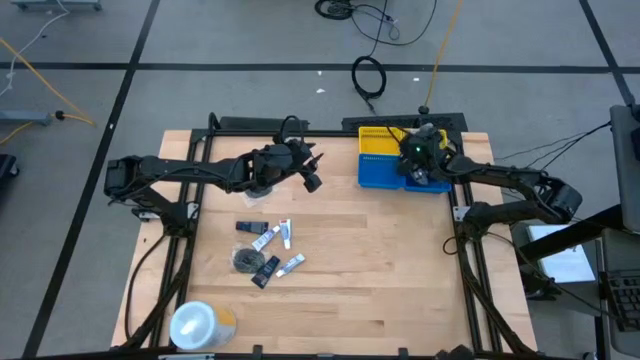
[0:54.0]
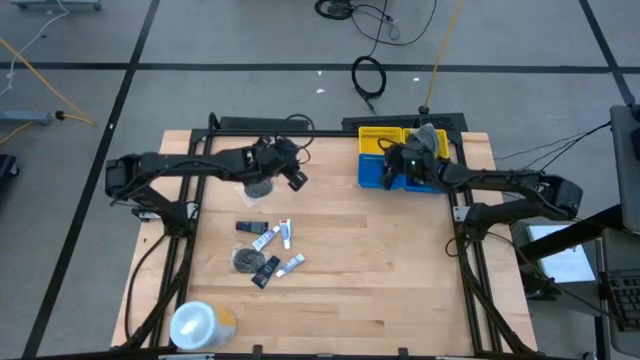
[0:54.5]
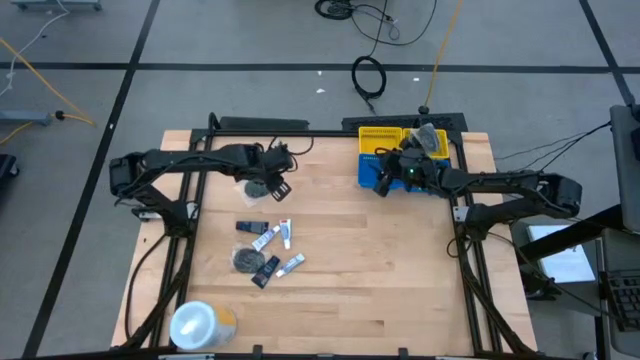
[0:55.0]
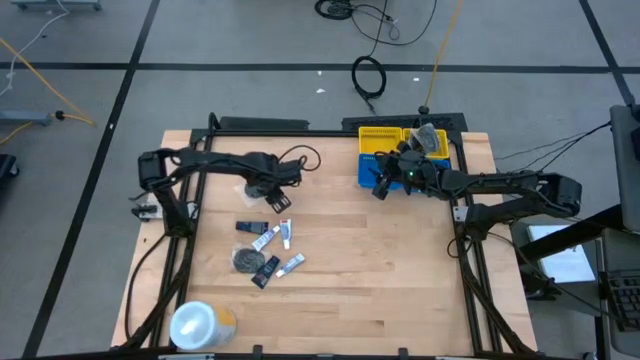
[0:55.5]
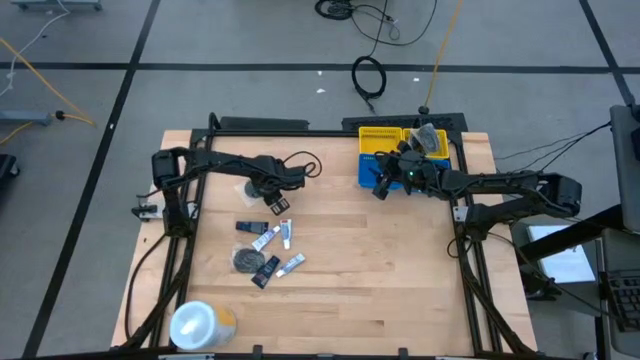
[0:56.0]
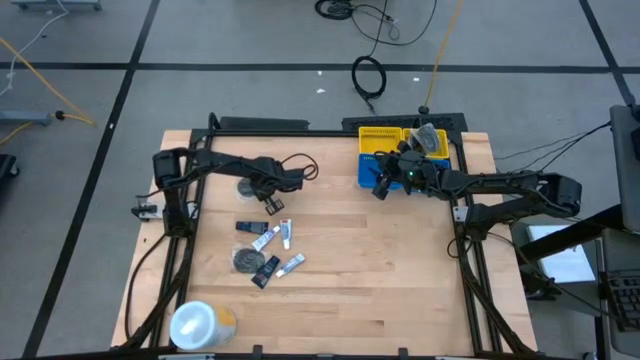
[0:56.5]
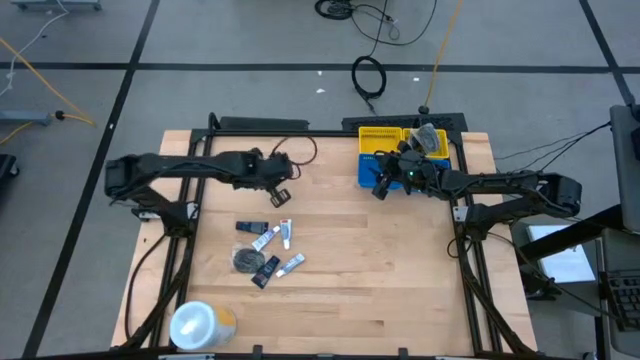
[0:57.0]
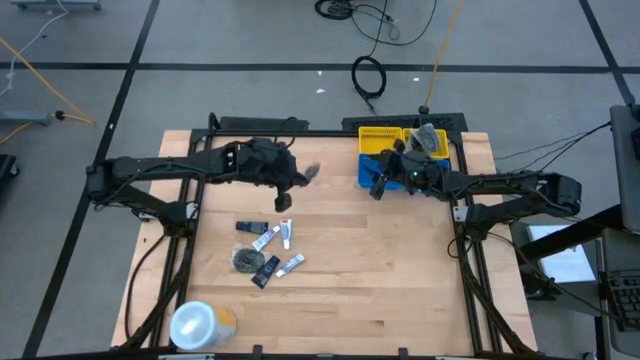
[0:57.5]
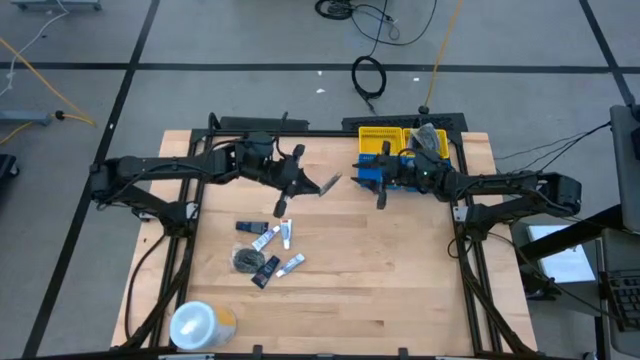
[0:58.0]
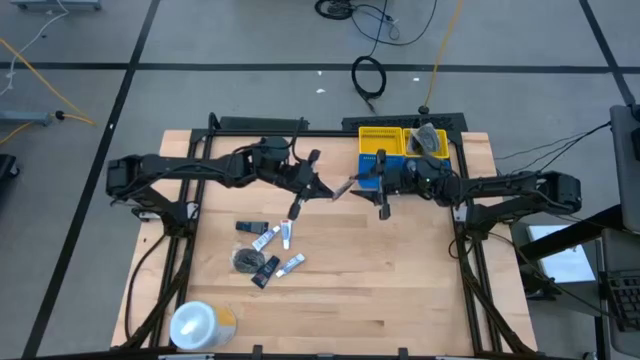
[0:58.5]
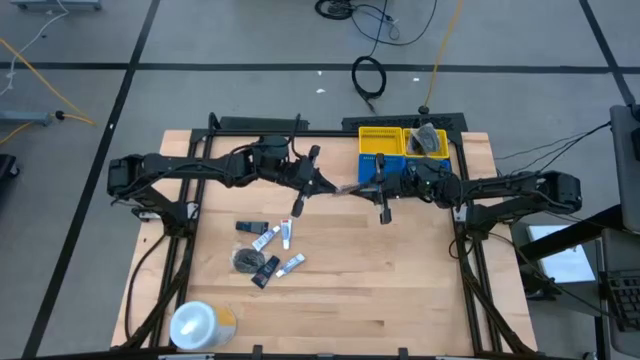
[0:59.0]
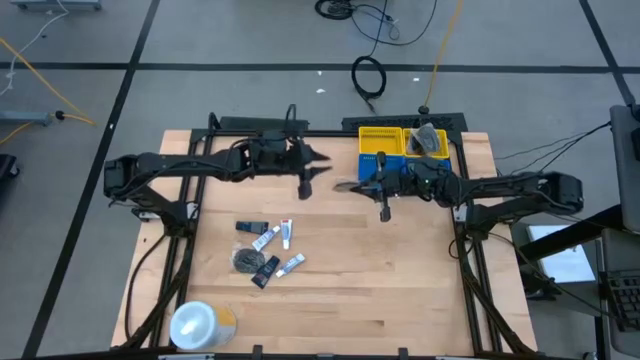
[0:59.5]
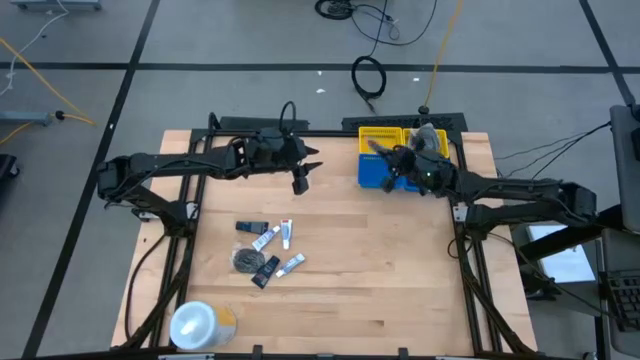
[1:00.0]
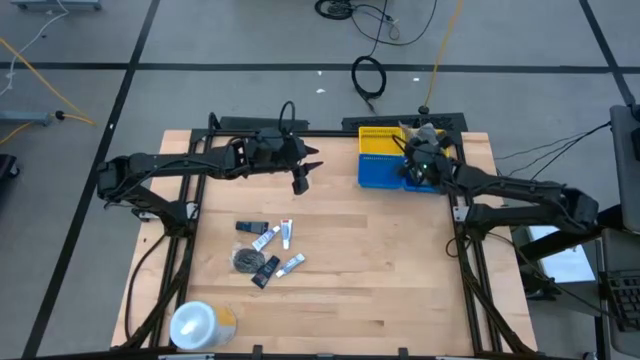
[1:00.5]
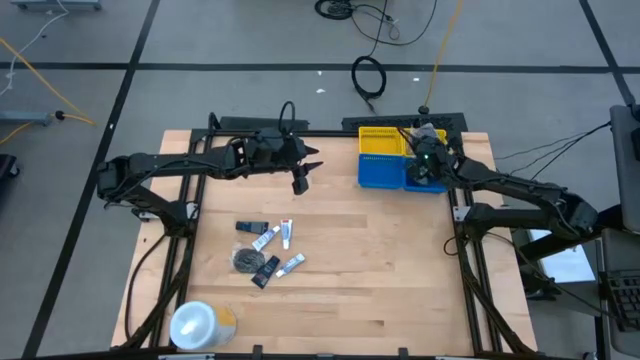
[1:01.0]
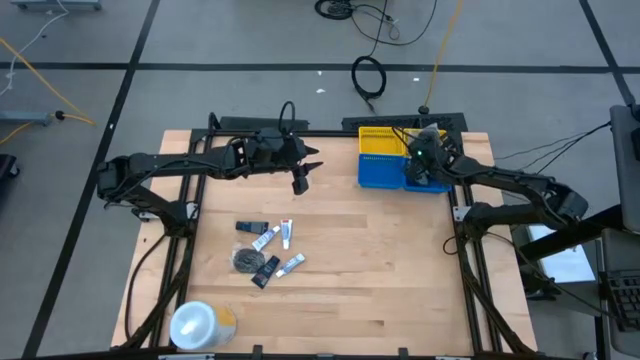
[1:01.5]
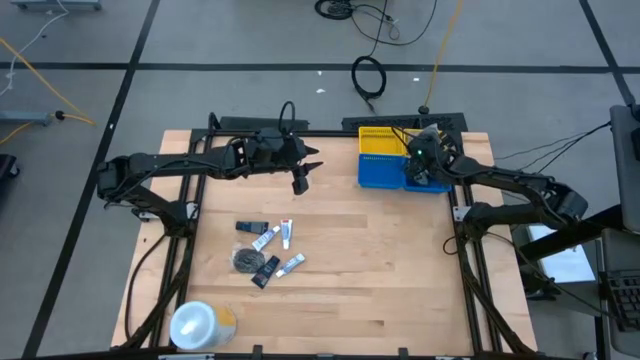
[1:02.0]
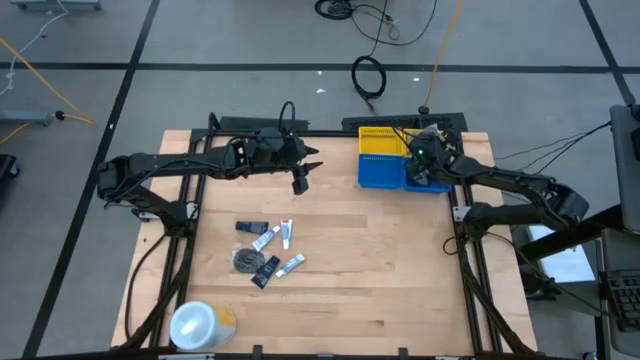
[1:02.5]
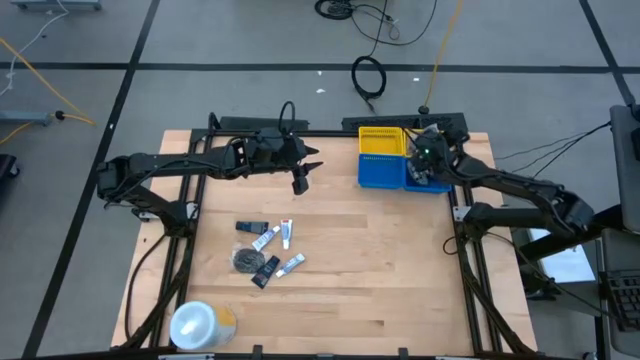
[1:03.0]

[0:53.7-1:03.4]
Task: Pick & Place Travel size toiletries
Put the black hairbrush into the right yellow basket

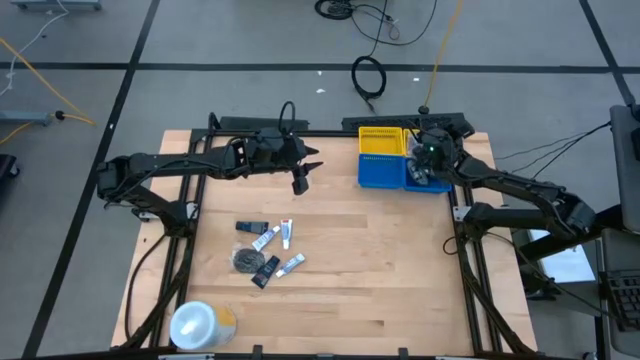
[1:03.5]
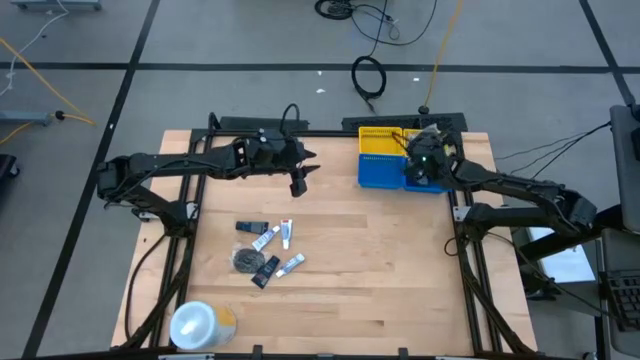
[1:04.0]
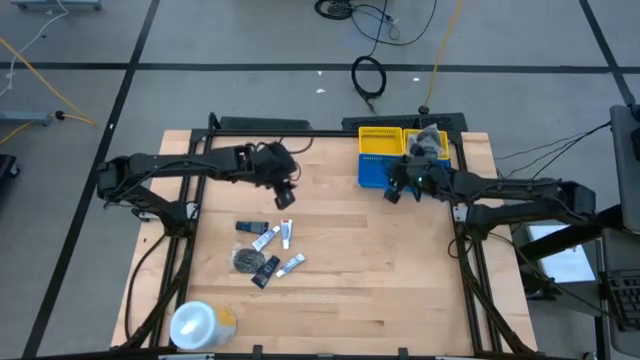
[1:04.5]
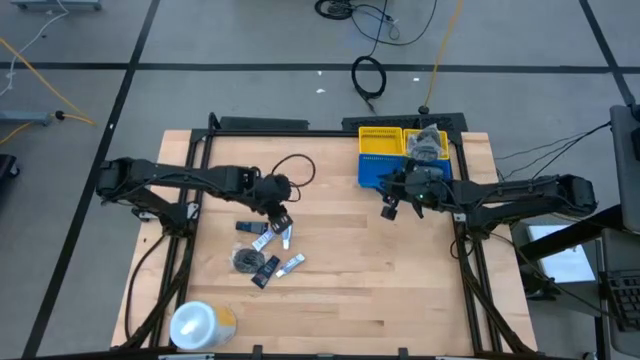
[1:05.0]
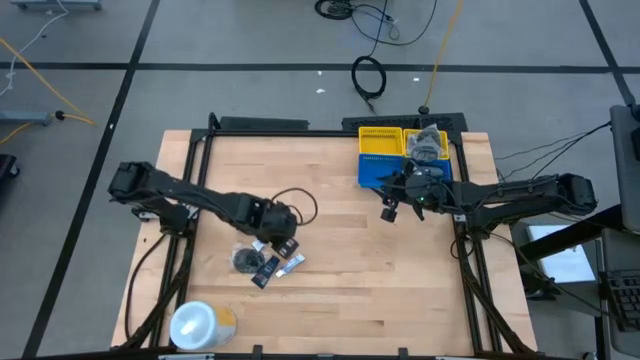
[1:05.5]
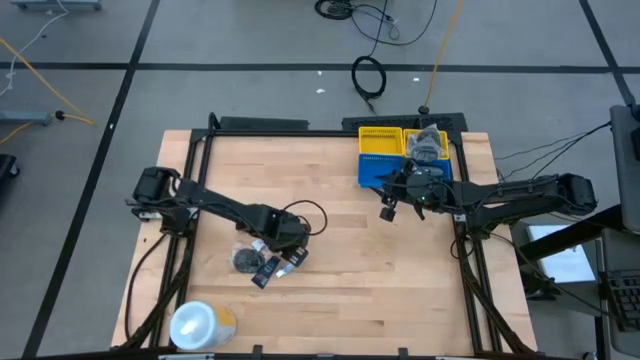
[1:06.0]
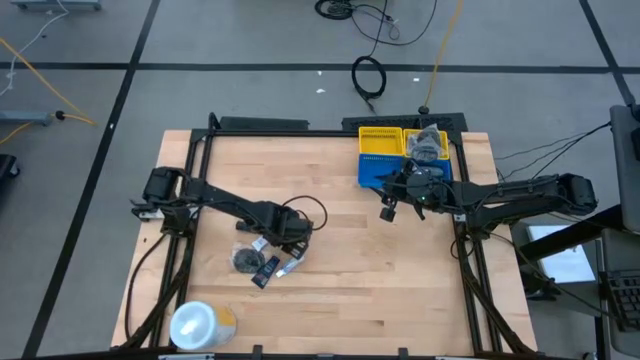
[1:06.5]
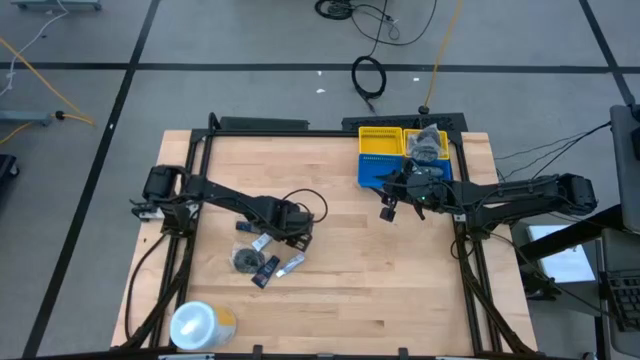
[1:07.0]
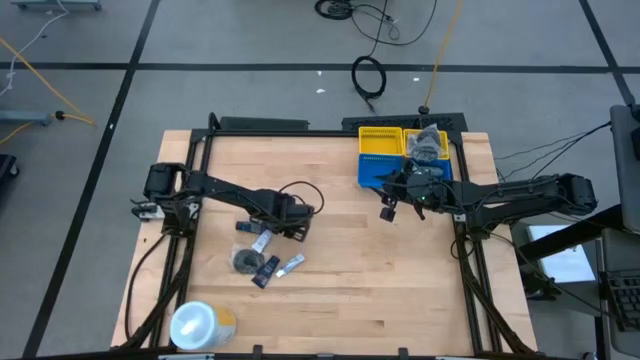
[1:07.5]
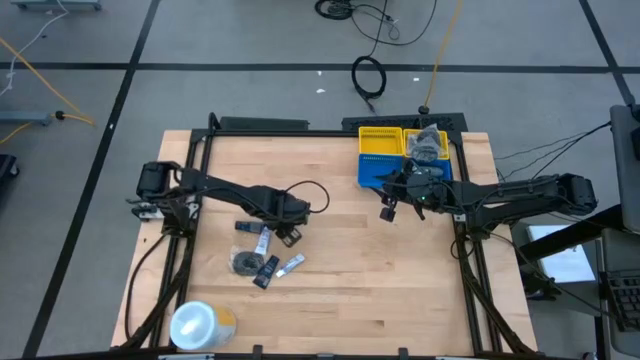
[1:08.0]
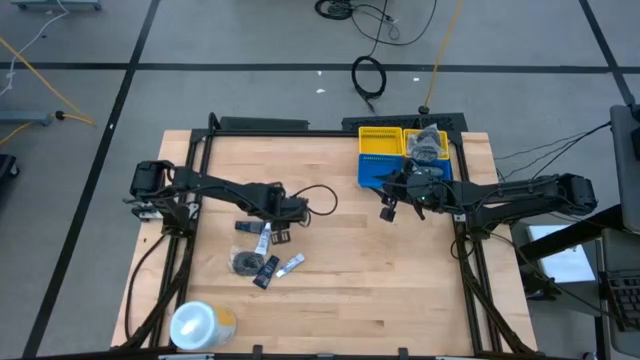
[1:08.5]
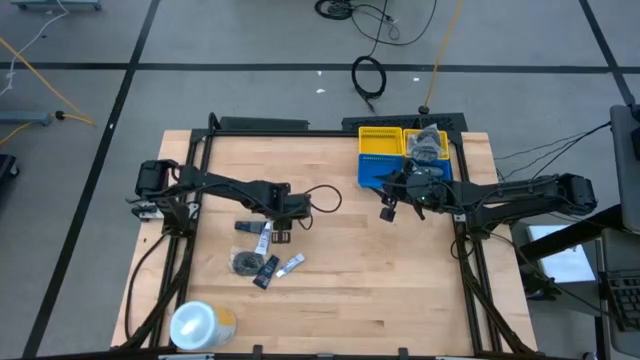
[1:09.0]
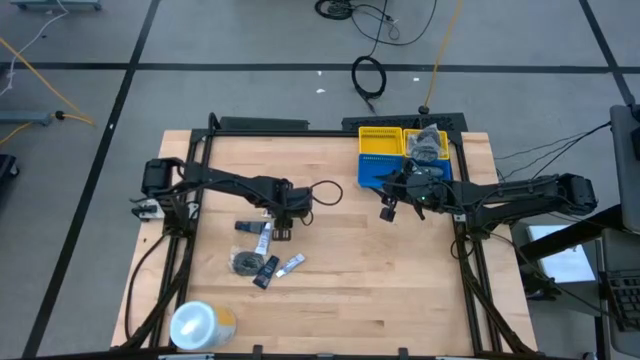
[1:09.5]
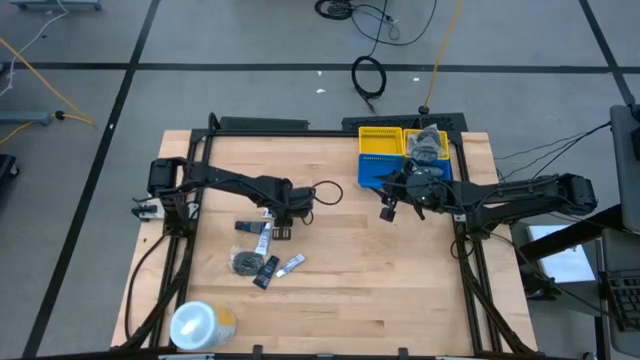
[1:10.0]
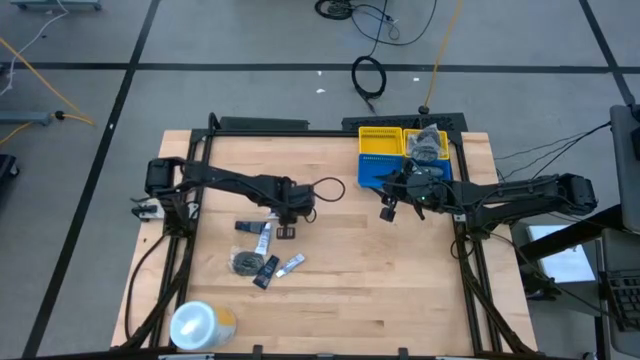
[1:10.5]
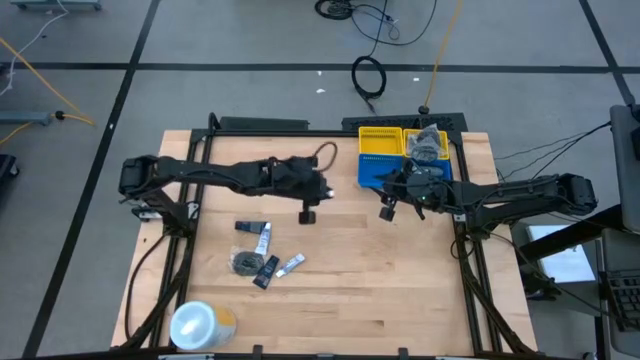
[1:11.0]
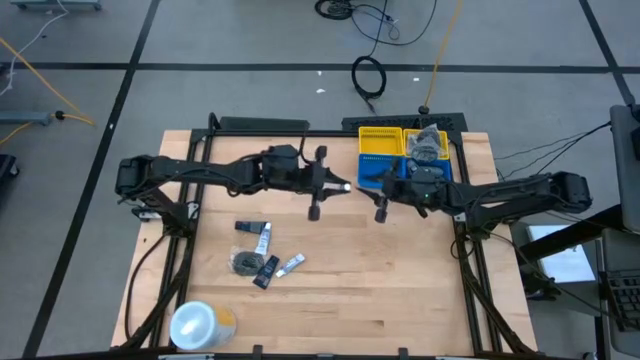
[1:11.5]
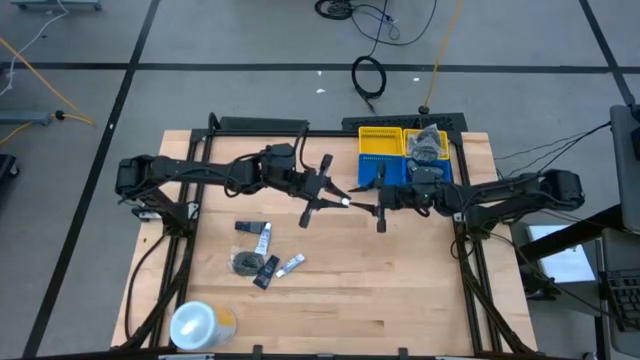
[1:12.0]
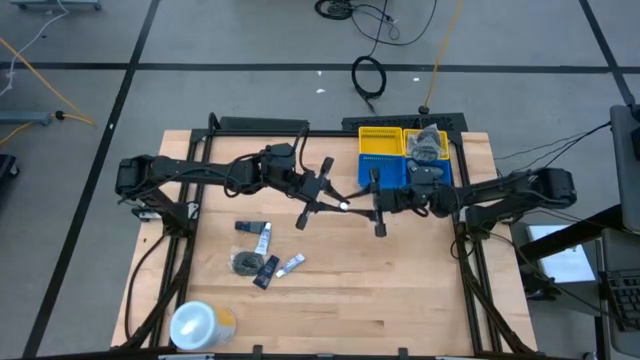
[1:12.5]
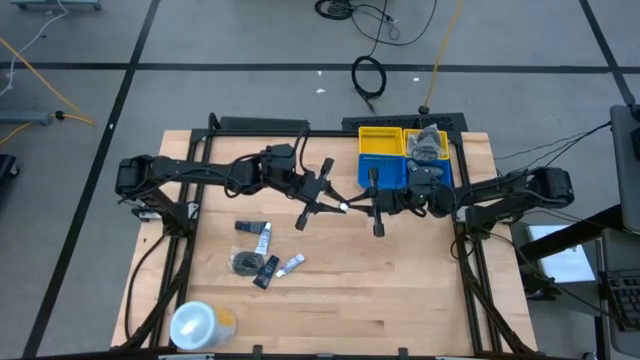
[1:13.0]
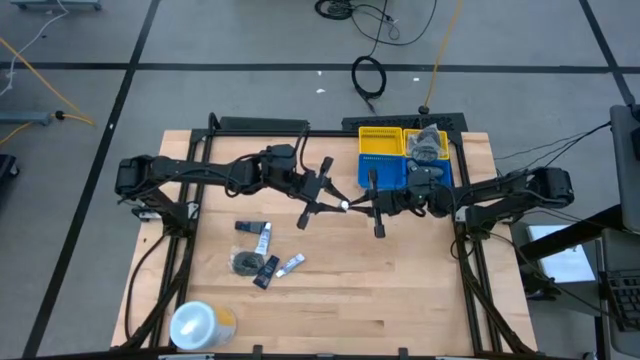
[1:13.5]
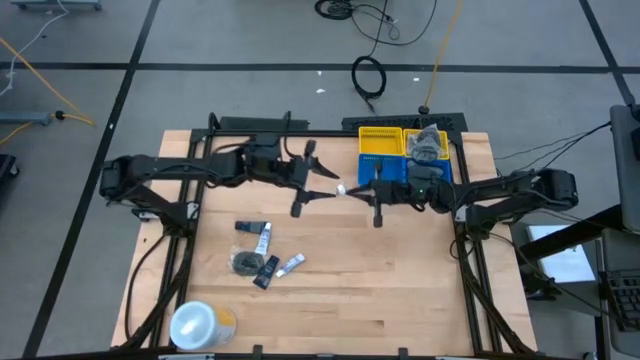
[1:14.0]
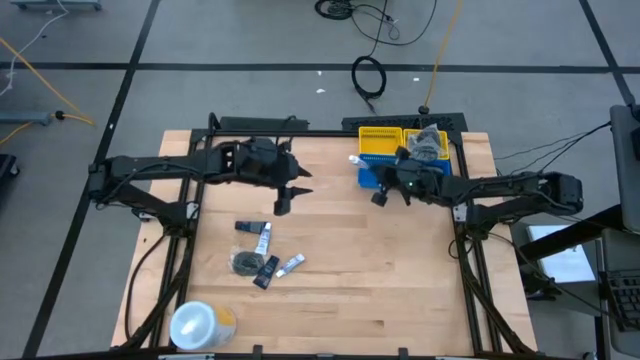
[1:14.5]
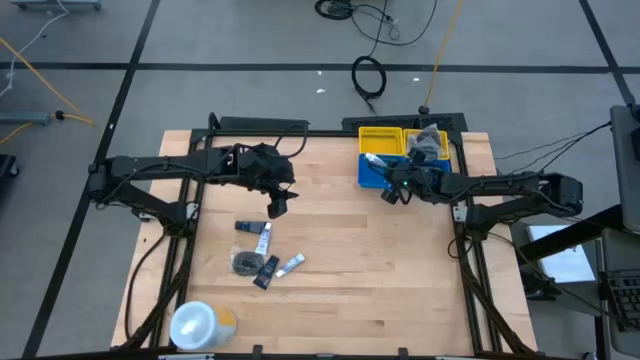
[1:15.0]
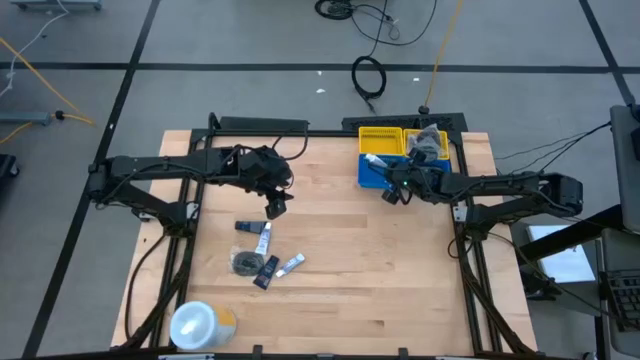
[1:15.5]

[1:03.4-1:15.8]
Put the white toothpaste into the left blue basket
